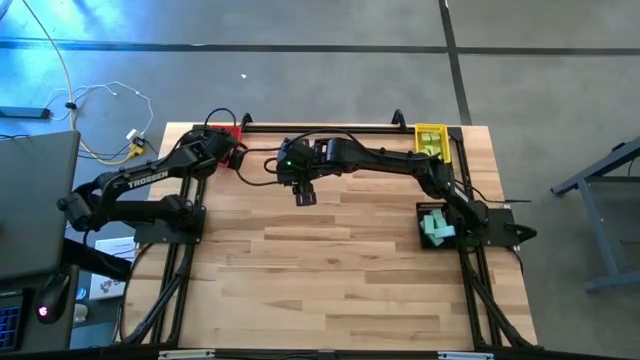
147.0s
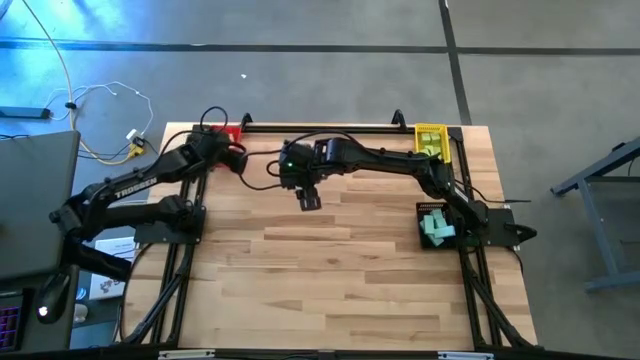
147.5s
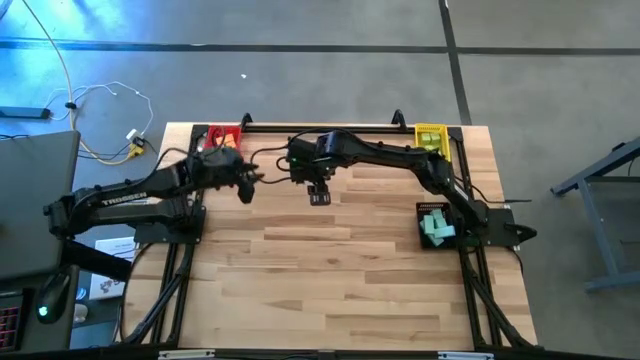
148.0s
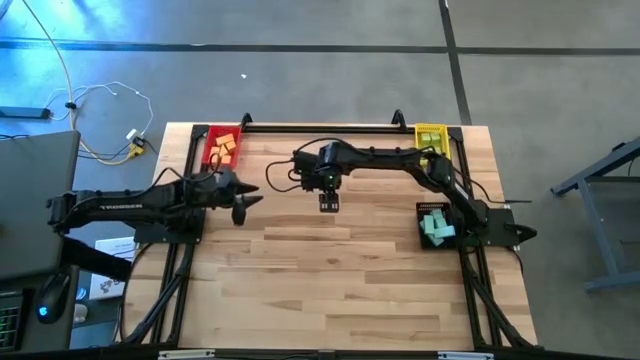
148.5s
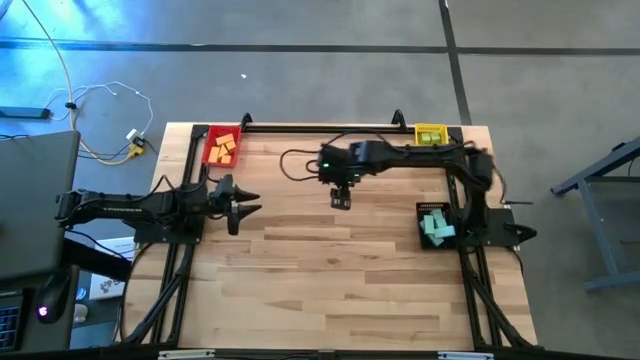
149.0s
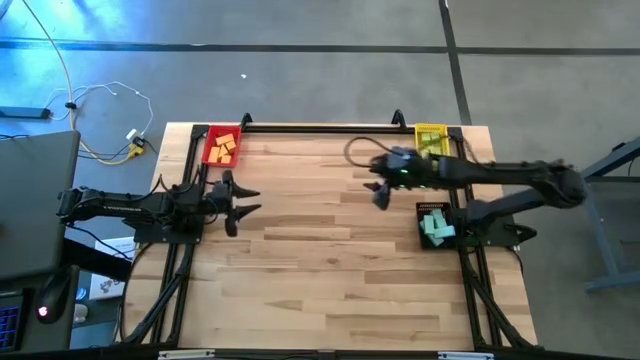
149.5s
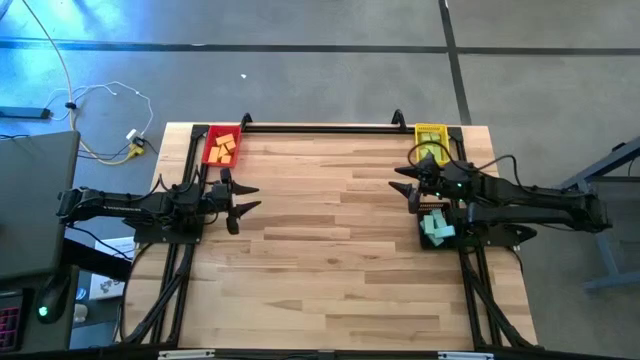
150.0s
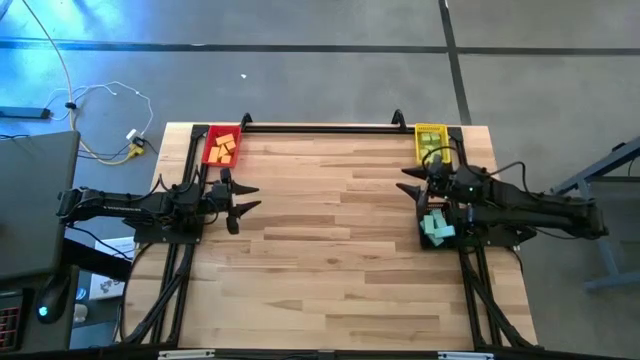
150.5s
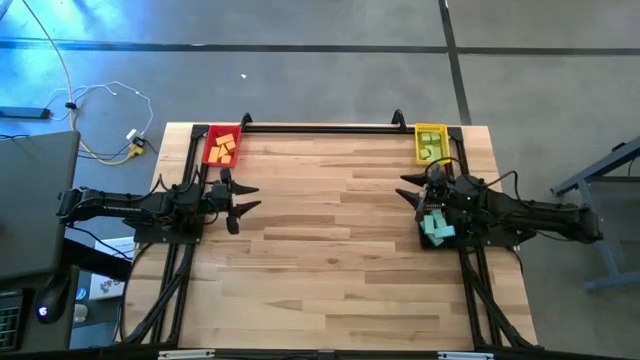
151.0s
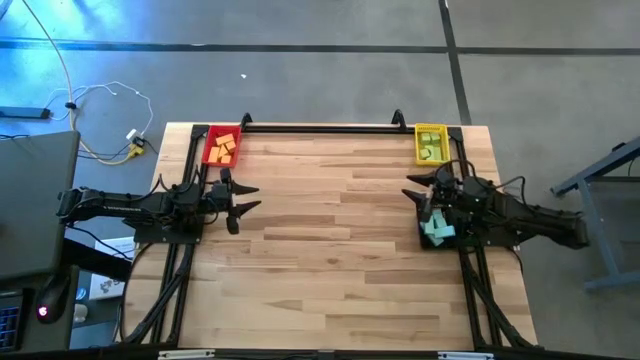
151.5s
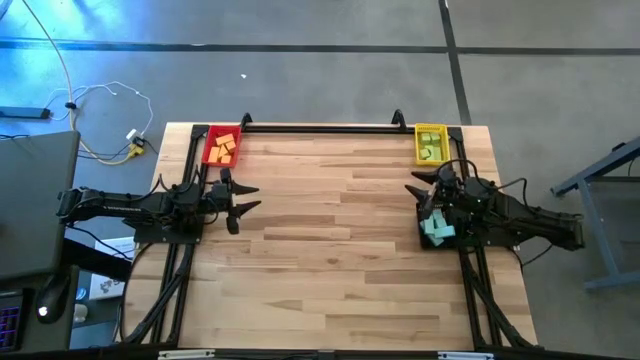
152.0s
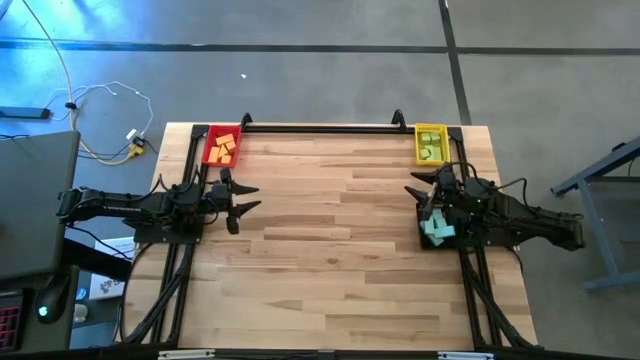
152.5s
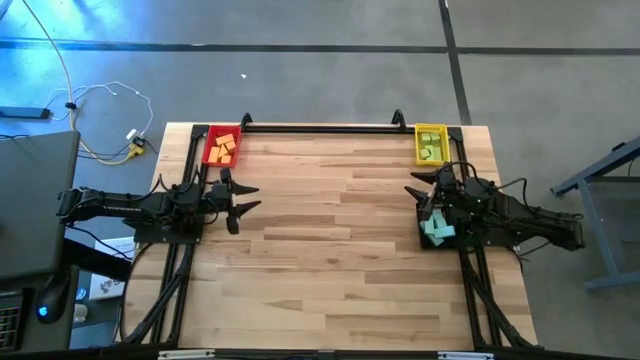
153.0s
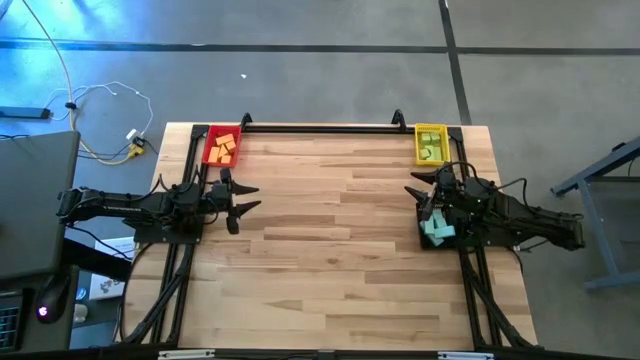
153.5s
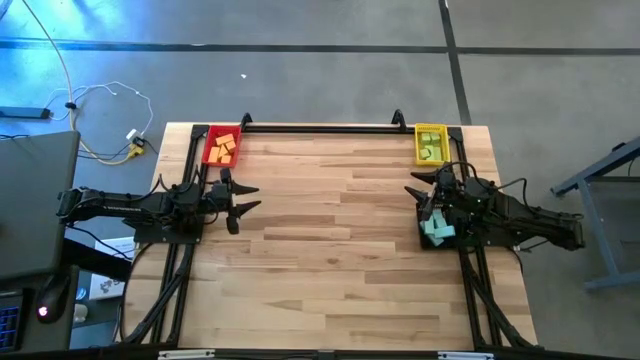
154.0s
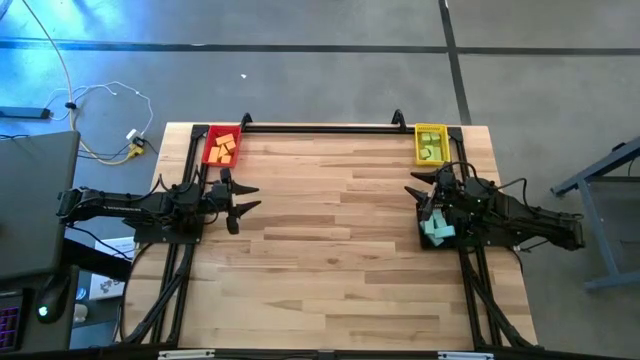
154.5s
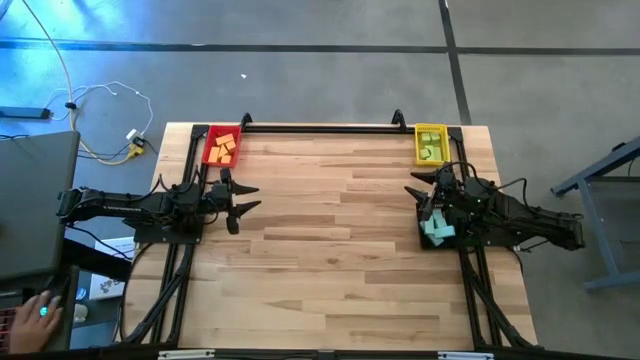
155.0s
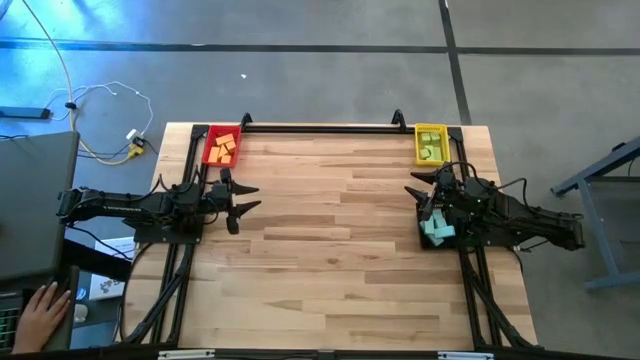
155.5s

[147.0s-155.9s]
Task: Sort & place blocks by color
Return to Home Position

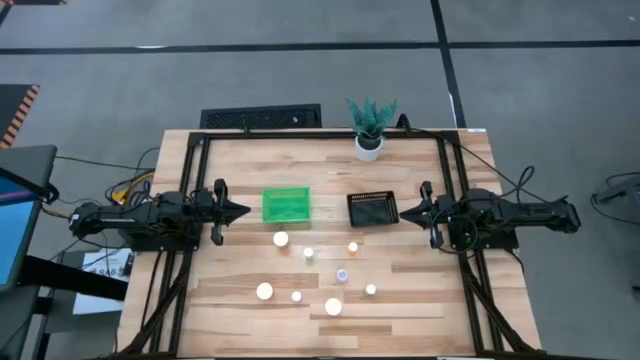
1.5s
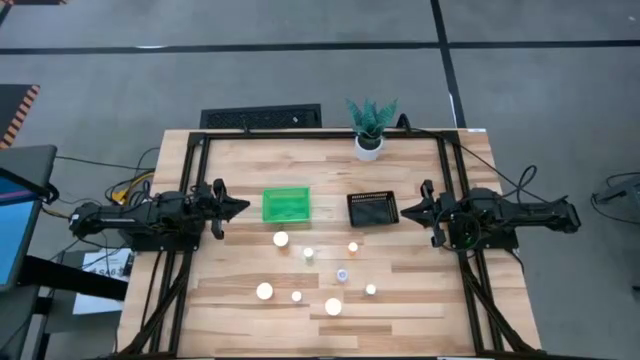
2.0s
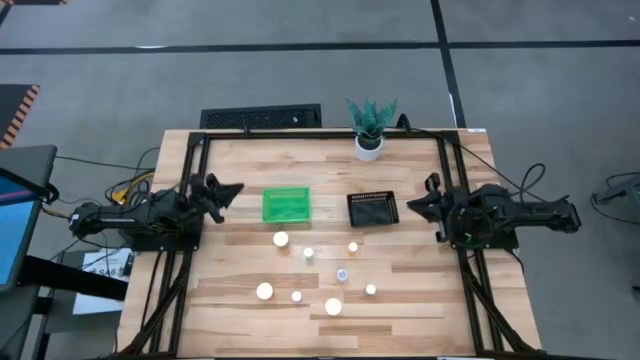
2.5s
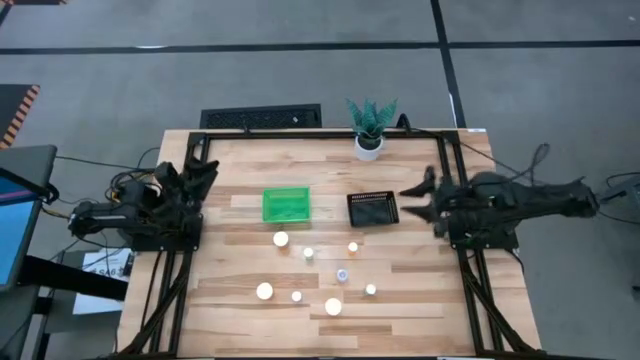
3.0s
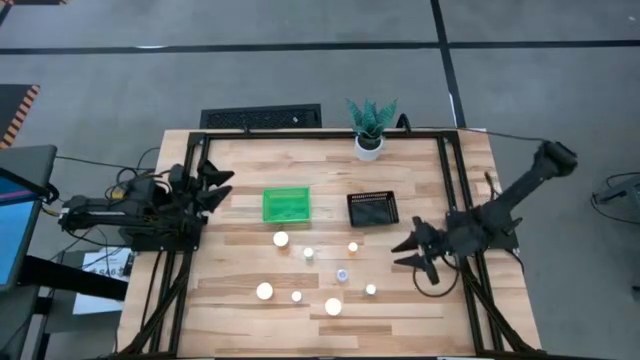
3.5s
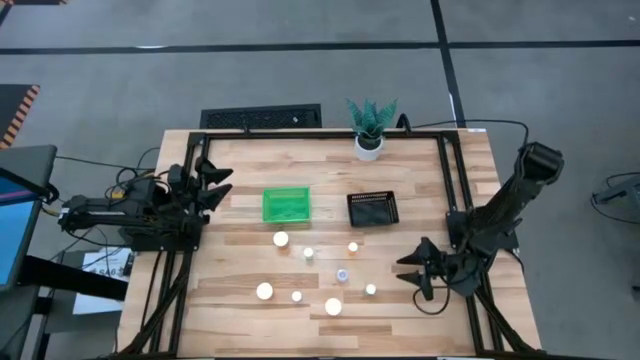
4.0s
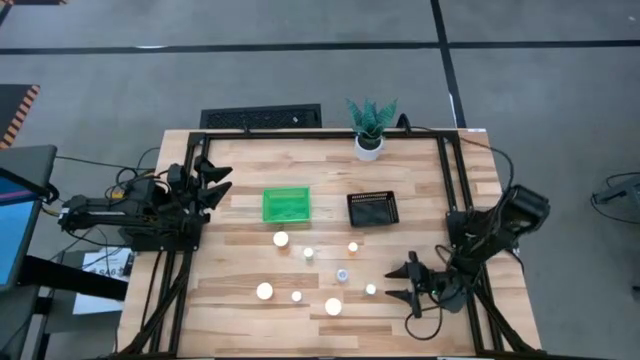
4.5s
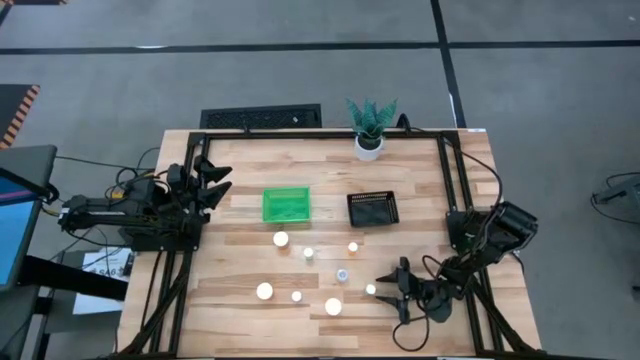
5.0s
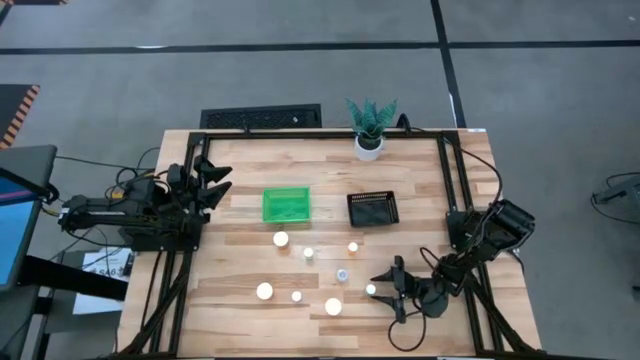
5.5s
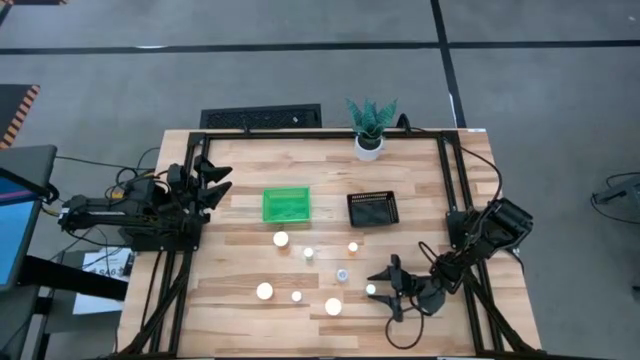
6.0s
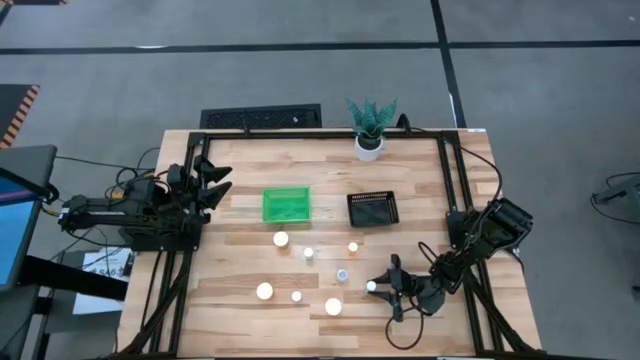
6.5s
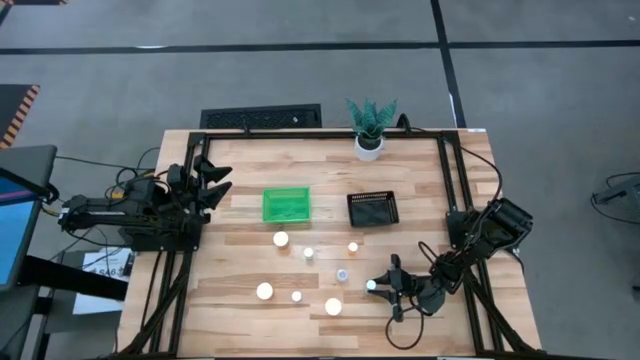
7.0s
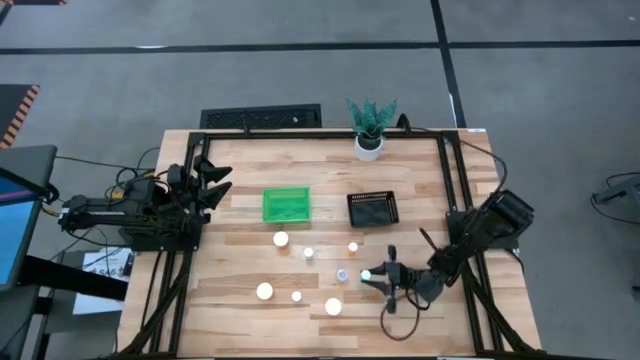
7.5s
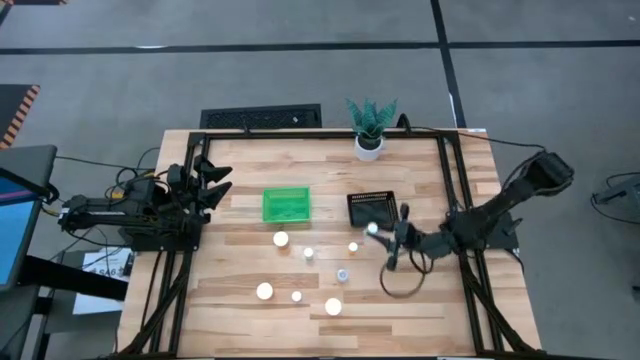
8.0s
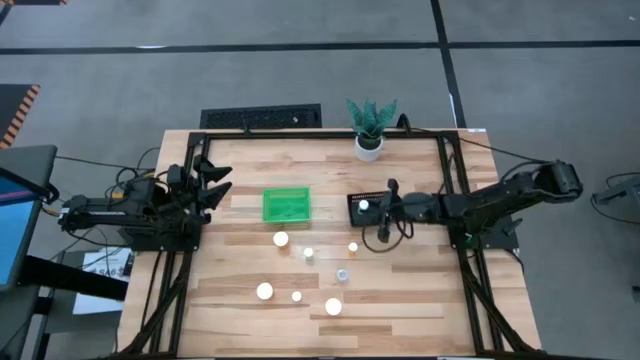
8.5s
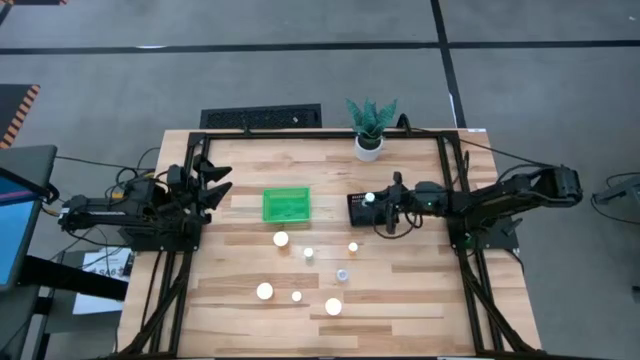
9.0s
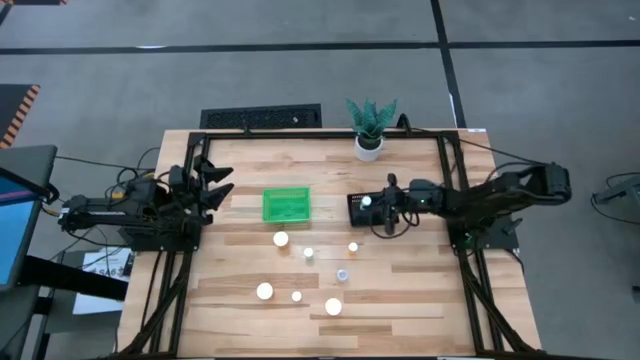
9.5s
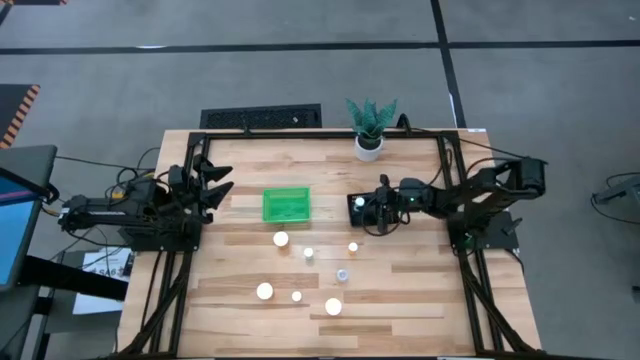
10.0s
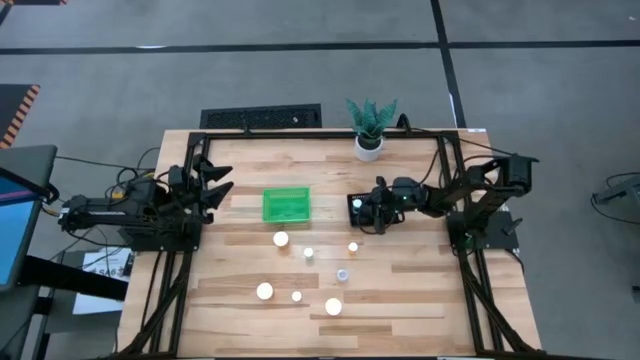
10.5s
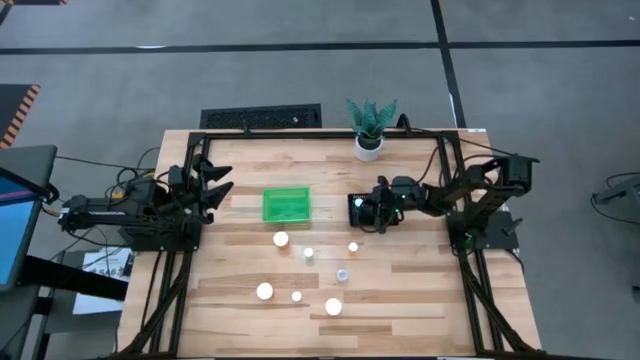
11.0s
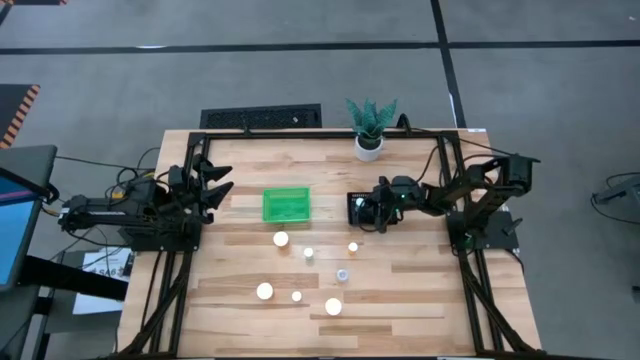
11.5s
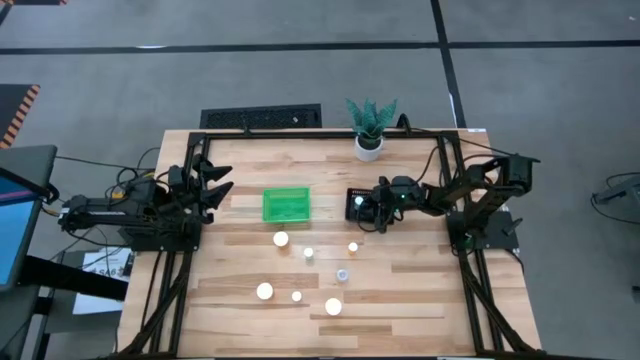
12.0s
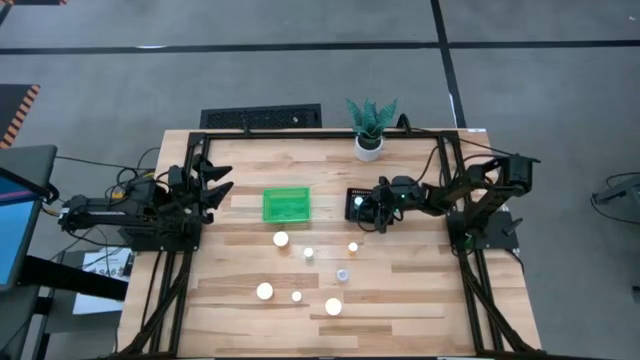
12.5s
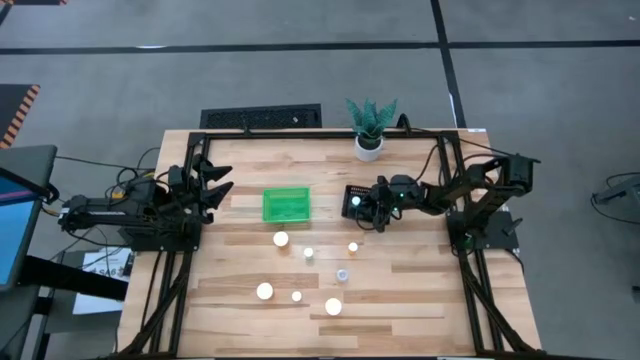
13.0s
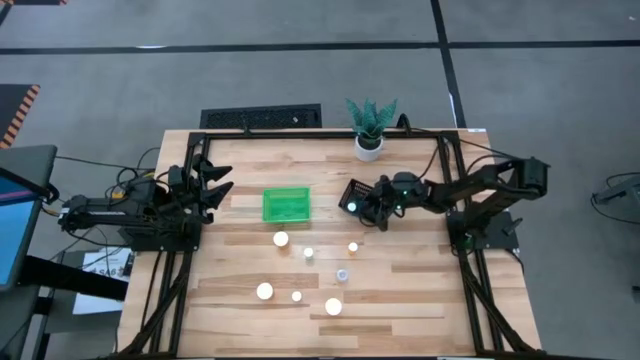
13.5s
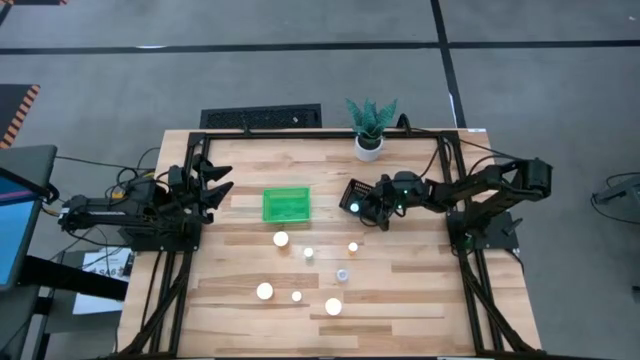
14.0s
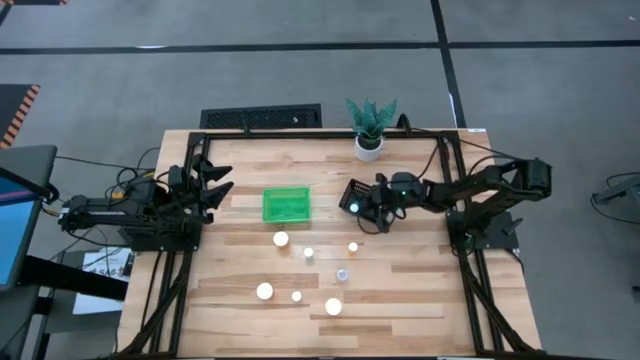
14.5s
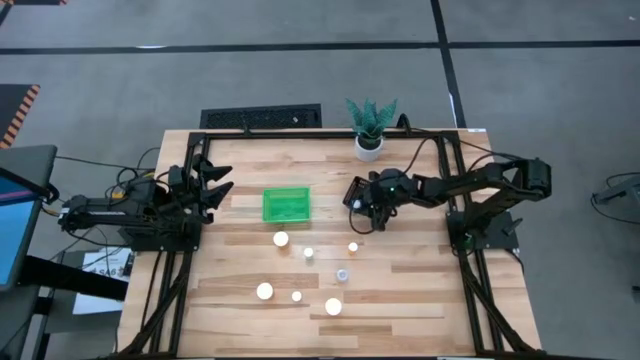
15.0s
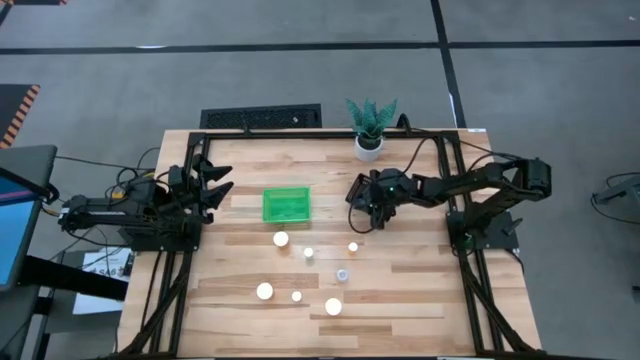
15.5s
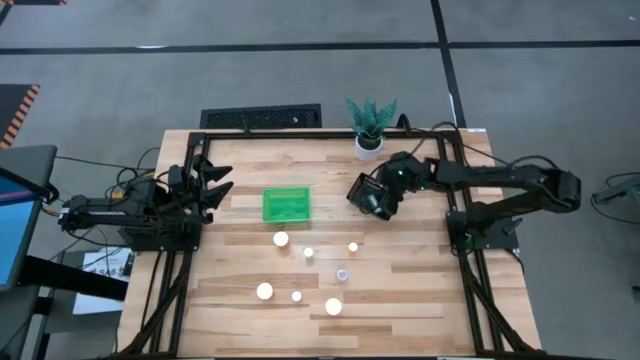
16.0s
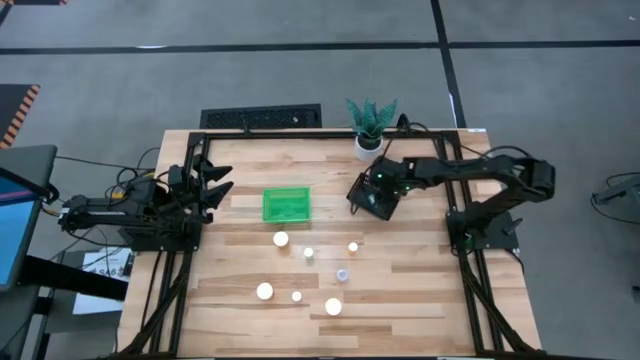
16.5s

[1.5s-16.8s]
Task: Pick and place medicine bottles into bin by pill shape (circle, oval)
Put the right blue tablet bottle into the black basket
